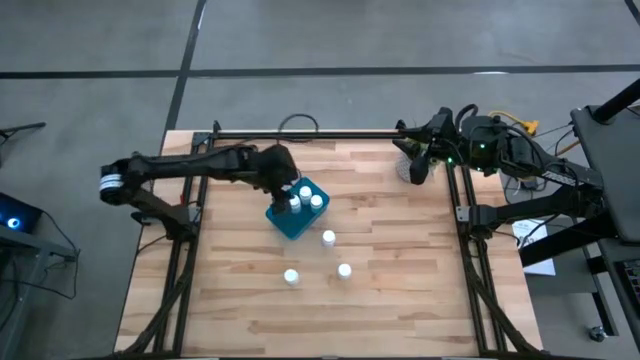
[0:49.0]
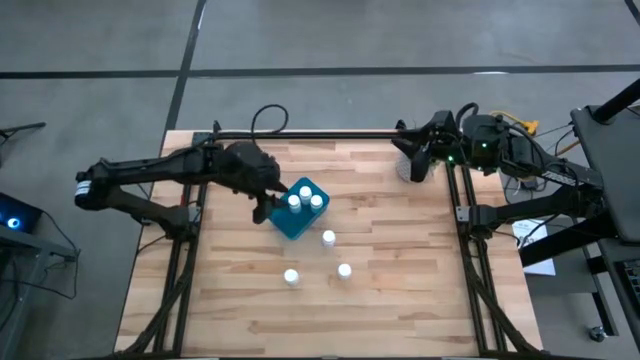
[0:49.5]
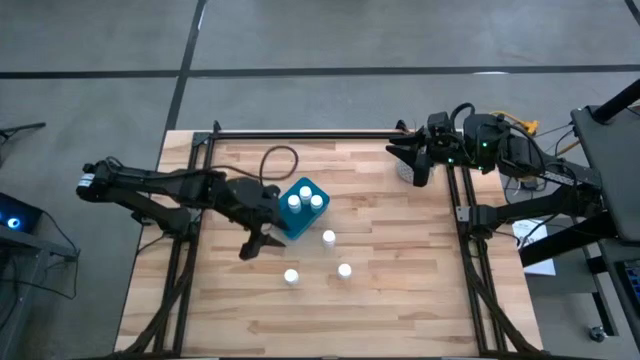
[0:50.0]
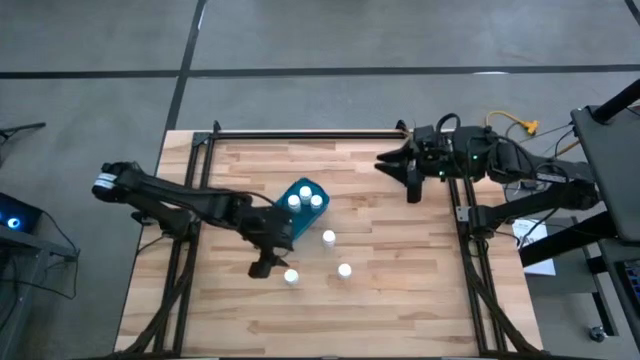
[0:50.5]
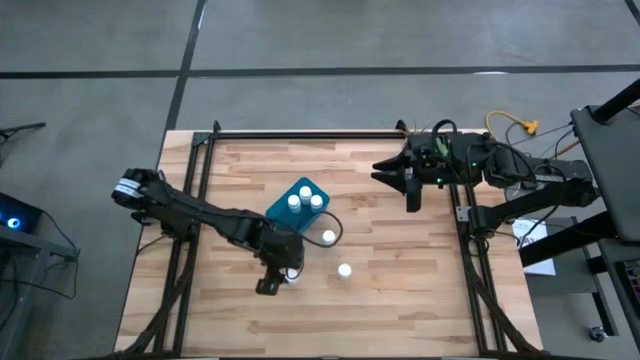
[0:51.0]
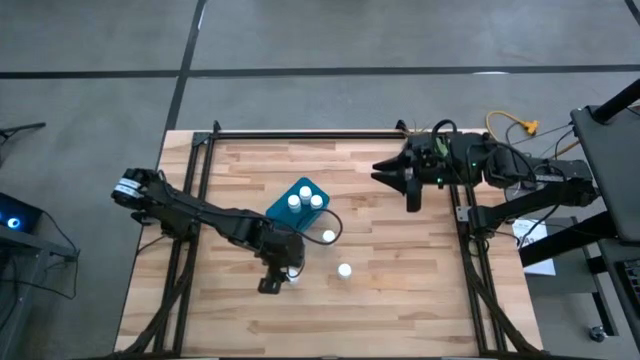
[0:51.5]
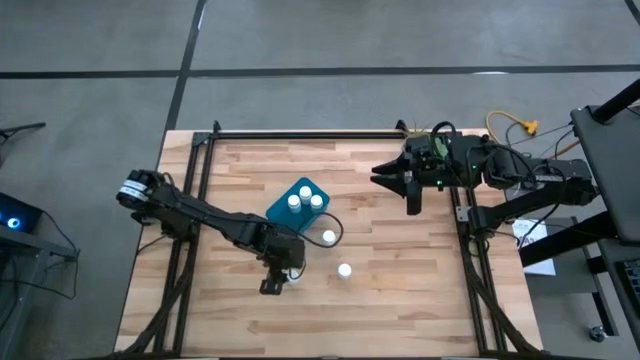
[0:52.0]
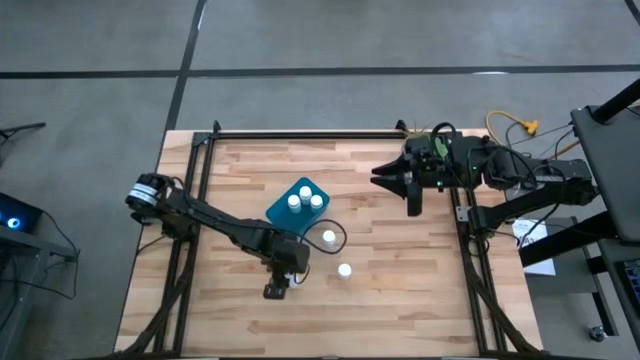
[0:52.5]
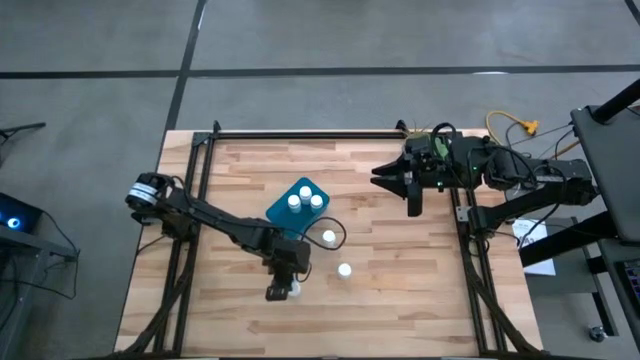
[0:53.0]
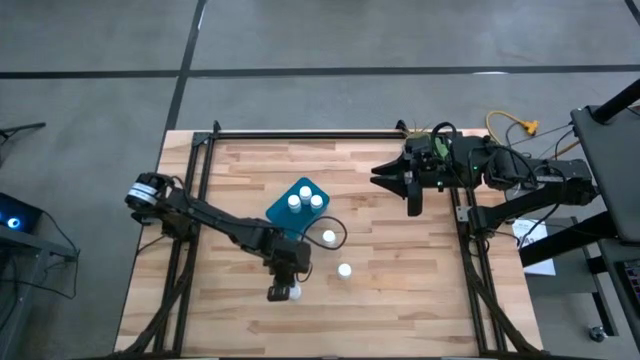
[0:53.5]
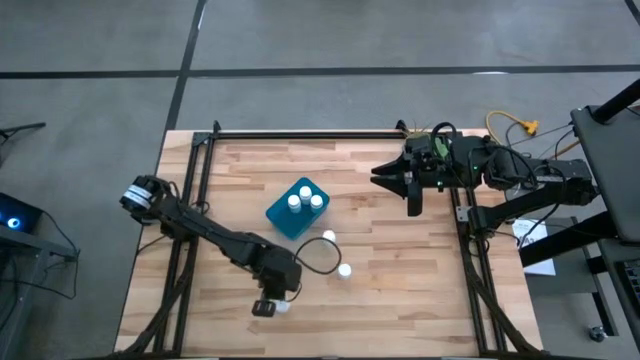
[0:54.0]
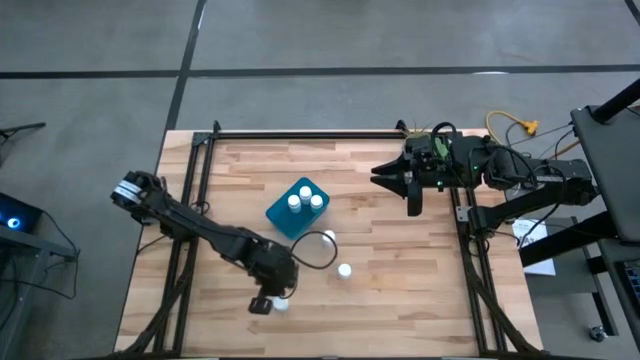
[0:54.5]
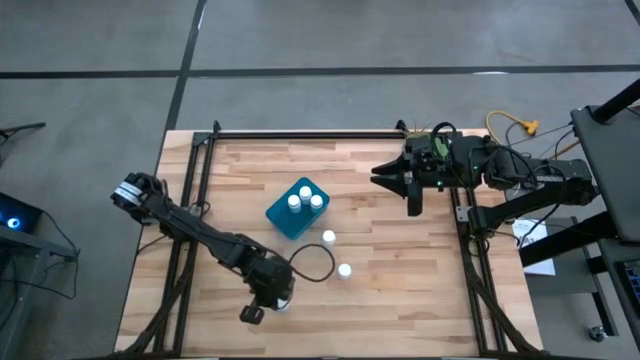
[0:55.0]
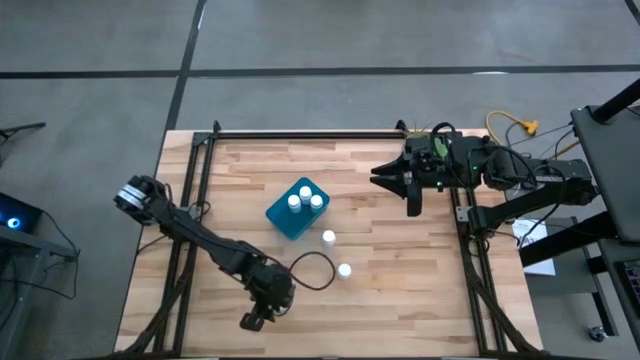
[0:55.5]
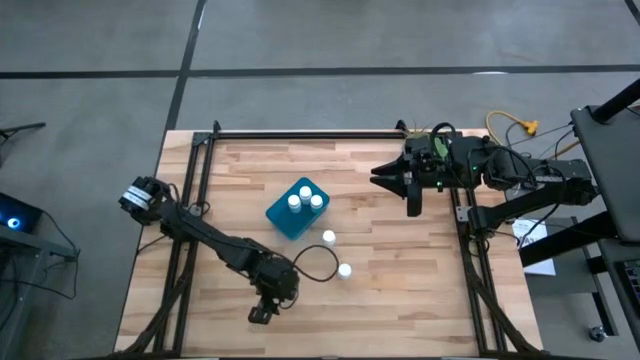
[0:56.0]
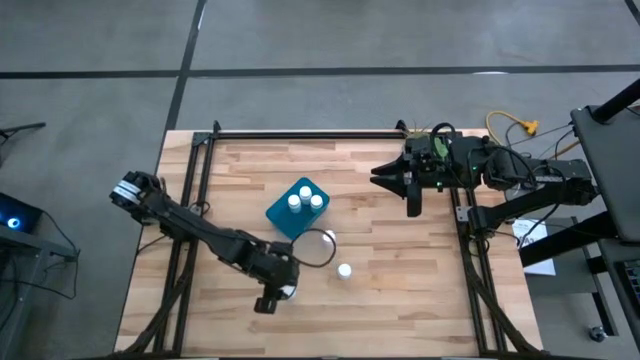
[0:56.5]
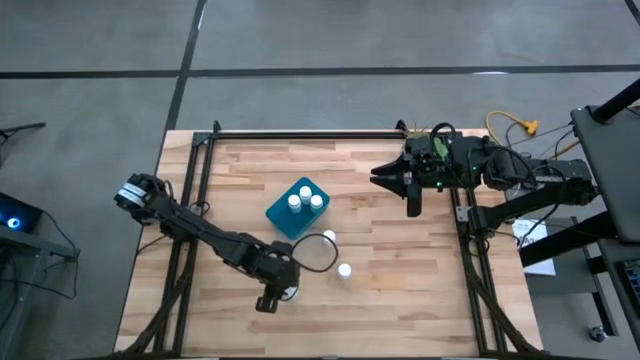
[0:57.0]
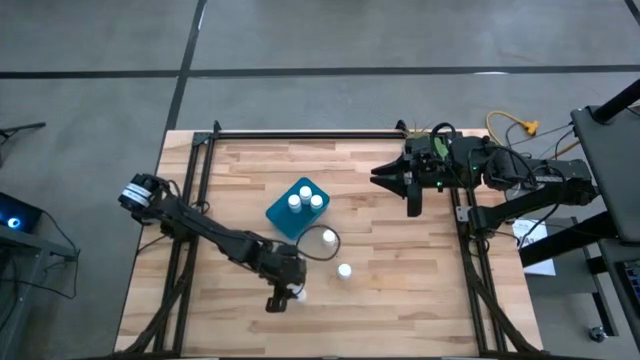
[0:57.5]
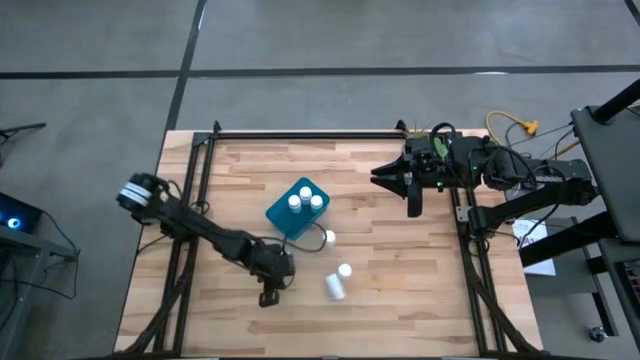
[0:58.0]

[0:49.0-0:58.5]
Task: Pick and place pill bottles into a basket
Put the left white pill bottle into the blue container

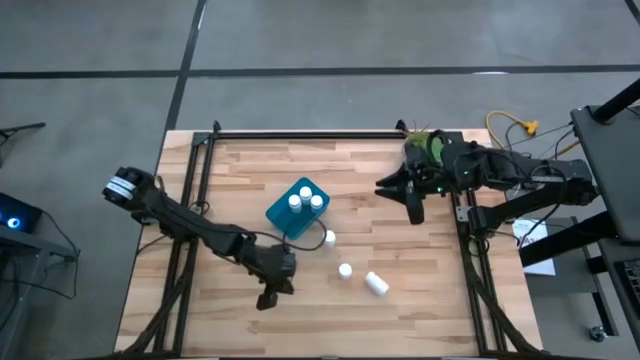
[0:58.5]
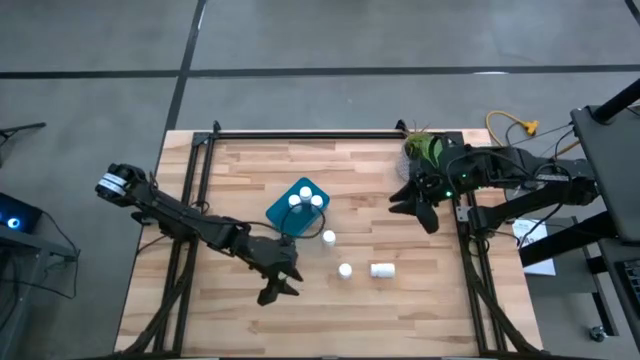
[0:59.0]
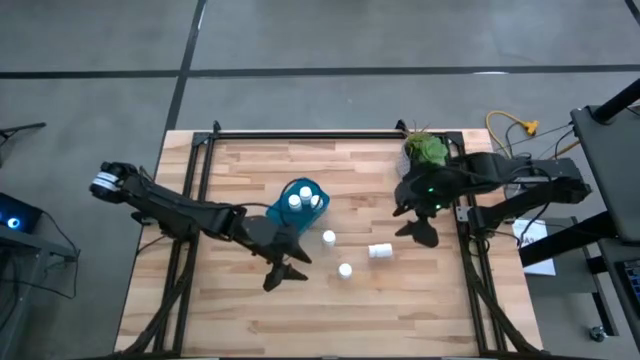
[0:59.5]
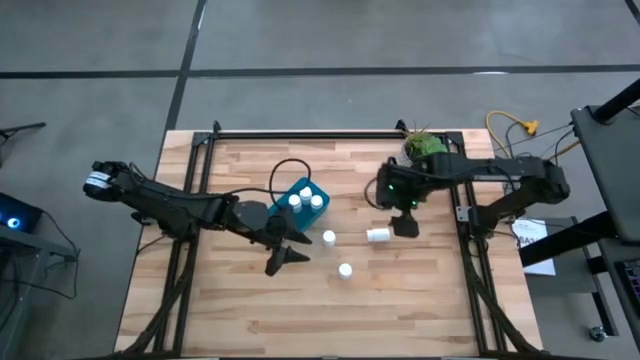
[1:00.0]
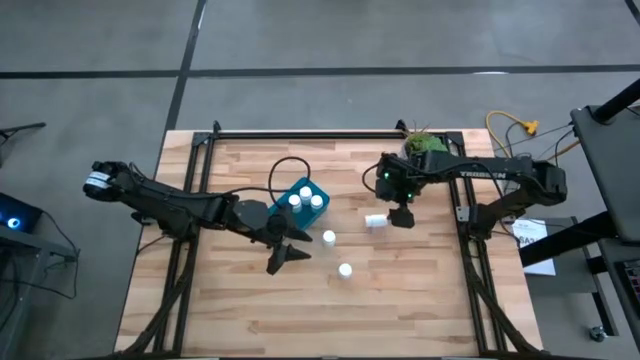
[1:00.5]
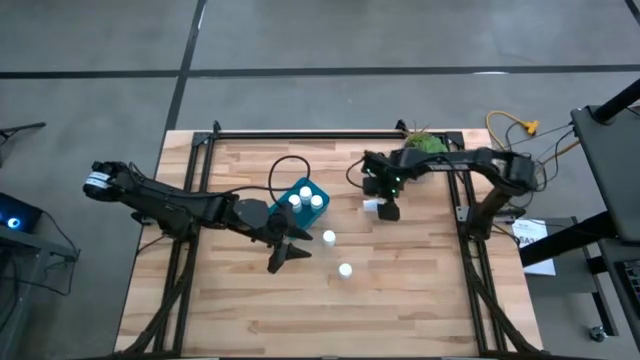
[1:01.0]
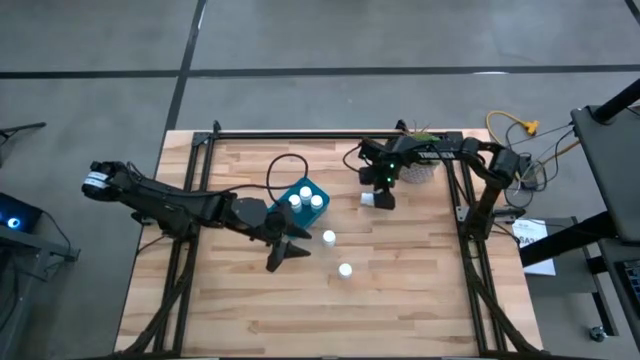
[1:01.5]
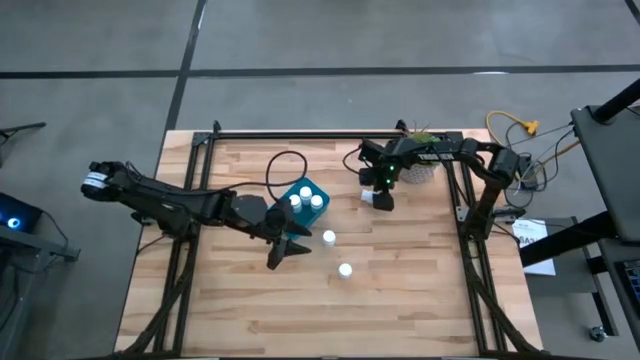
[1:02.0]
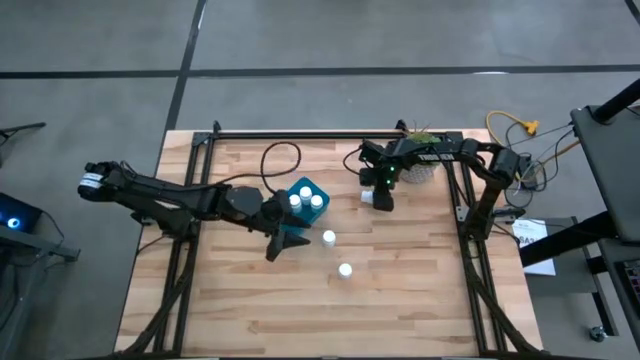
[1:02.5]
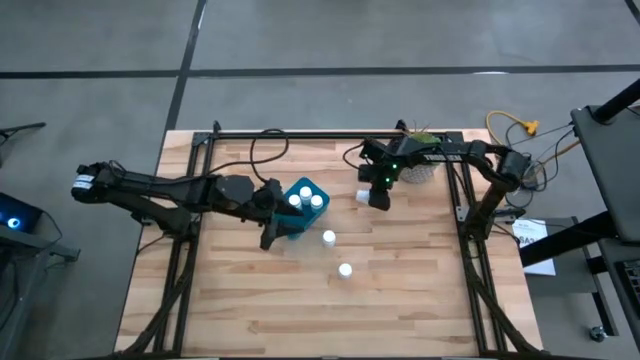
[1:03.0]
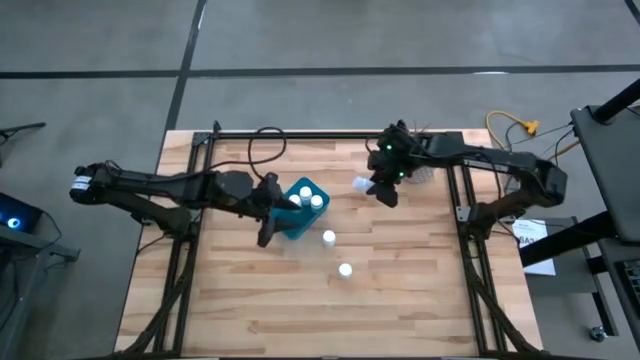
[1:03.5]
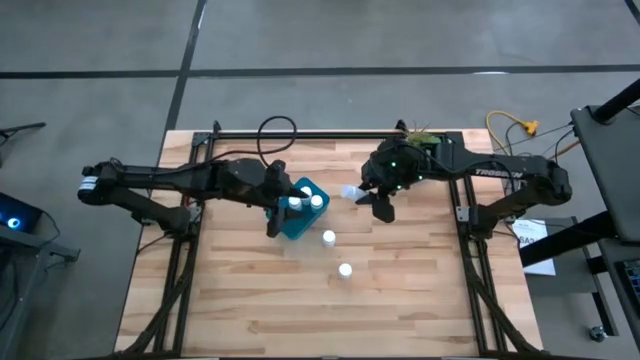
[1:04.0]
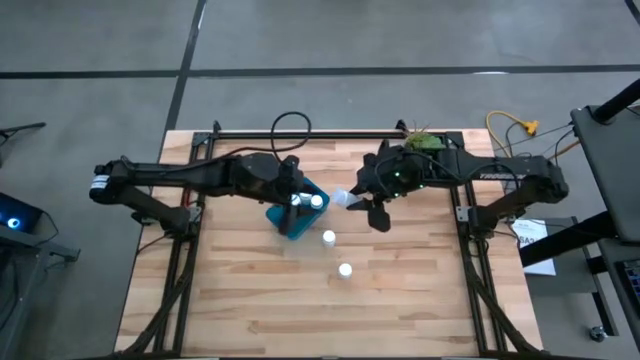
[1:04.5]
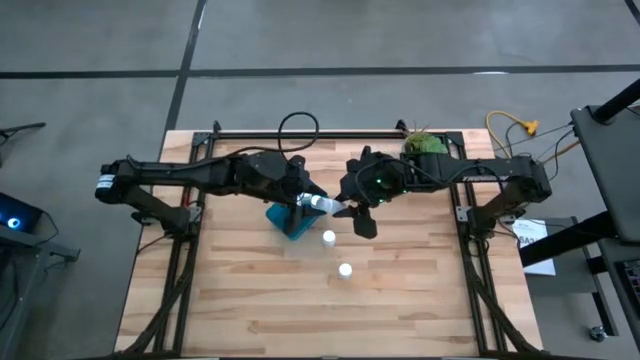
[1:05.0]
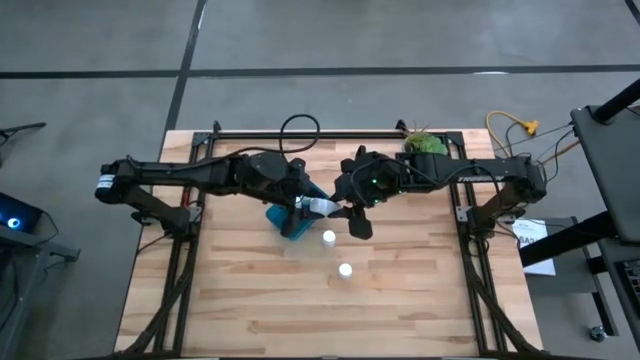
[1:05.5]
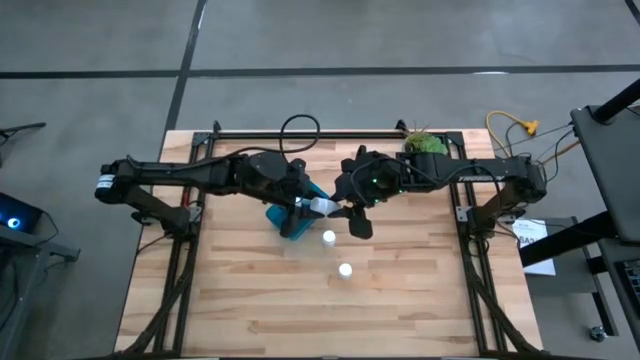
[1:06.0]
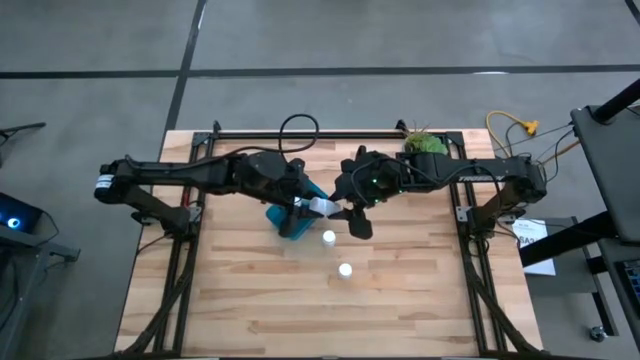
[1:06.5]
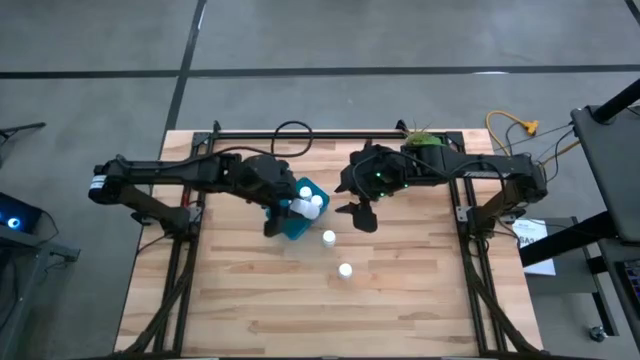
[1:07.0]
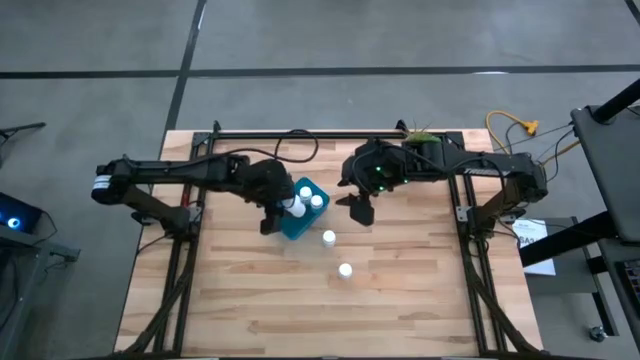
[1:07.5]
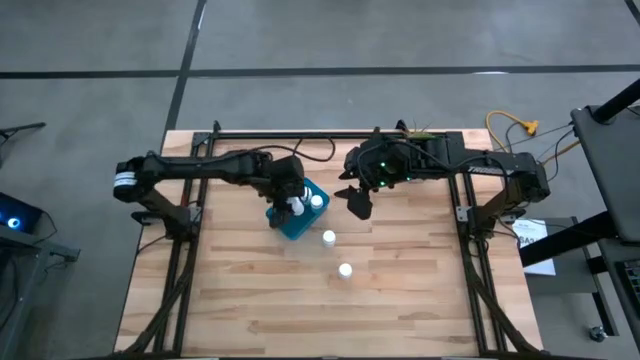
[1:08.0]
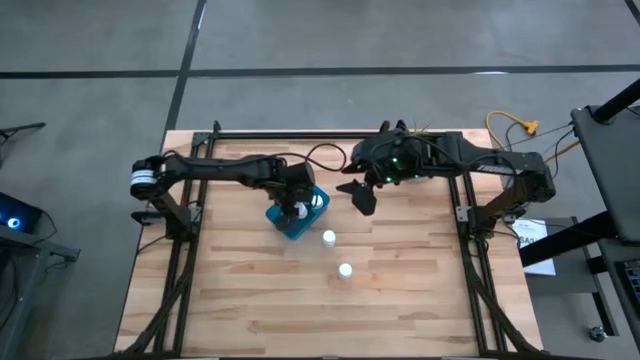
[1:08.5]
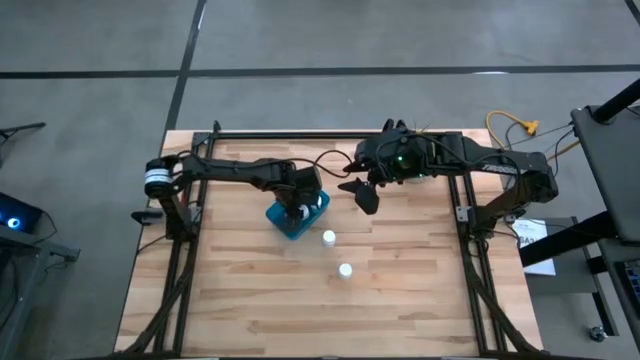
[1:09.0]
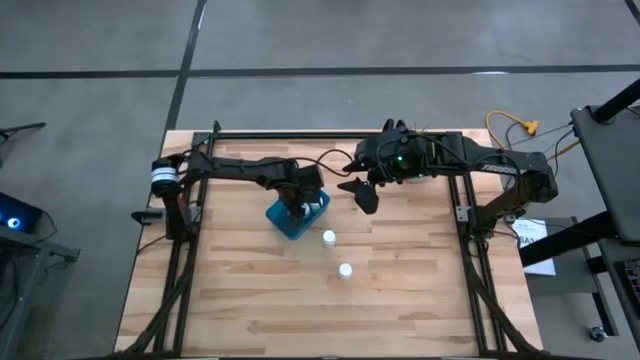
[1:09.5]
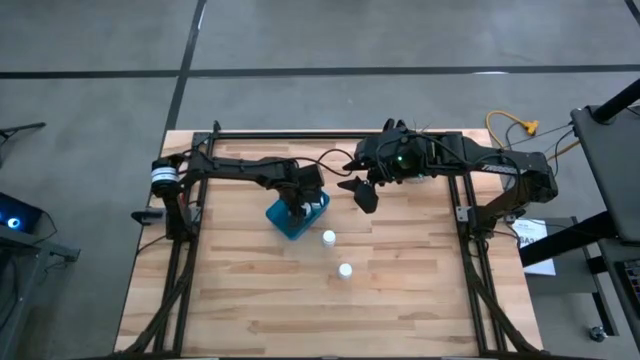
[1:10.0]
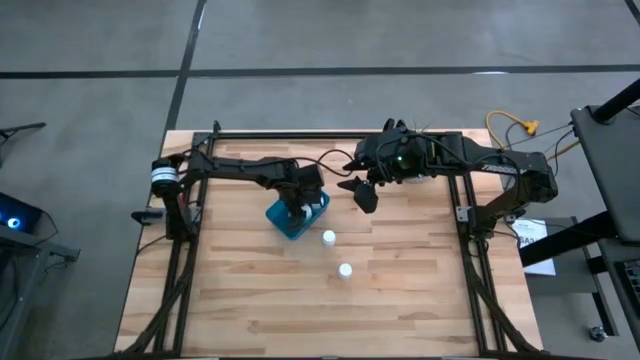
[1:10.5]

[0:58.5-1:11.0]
Put the left white pill bottle into the blue container
